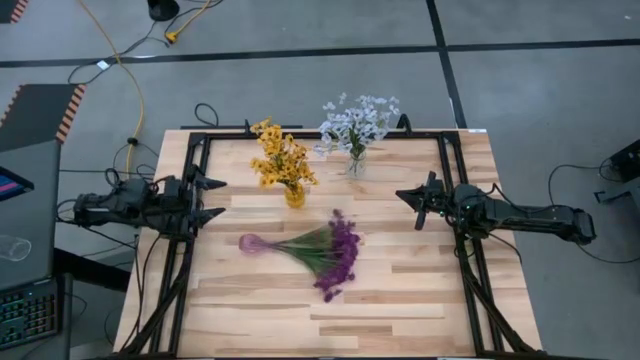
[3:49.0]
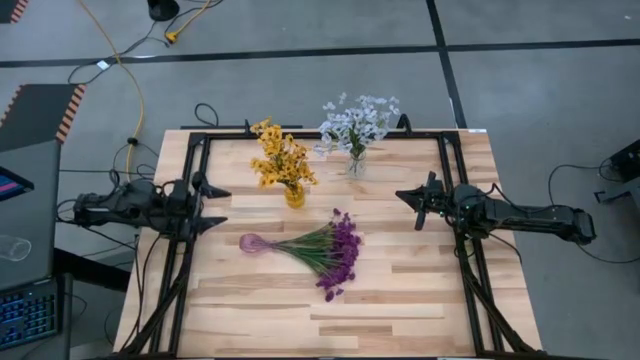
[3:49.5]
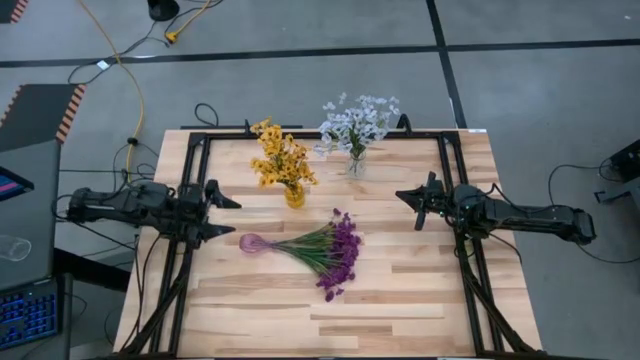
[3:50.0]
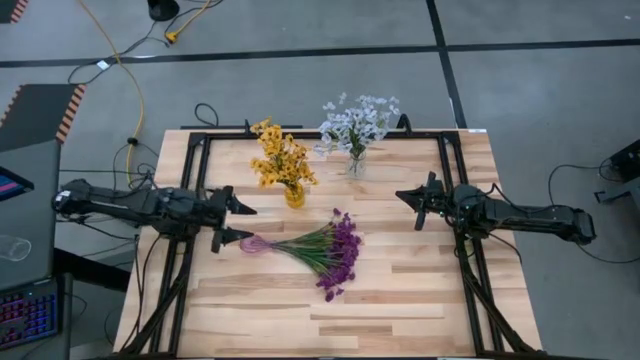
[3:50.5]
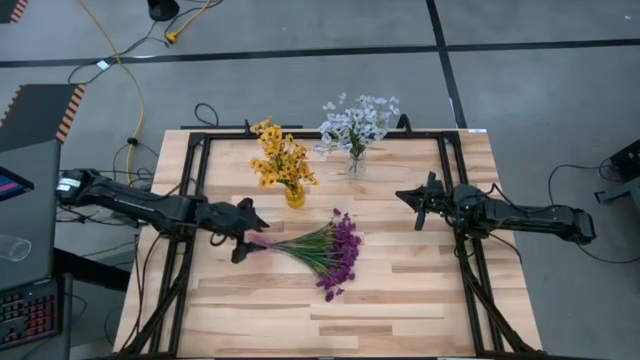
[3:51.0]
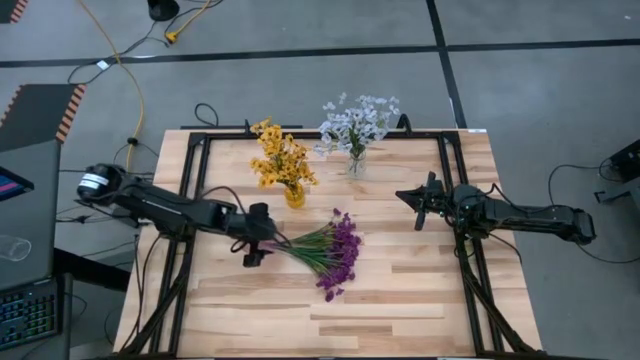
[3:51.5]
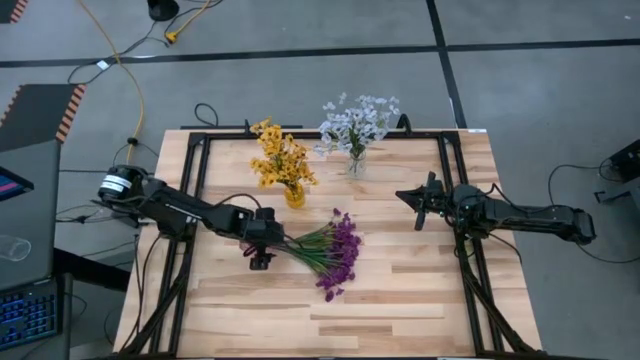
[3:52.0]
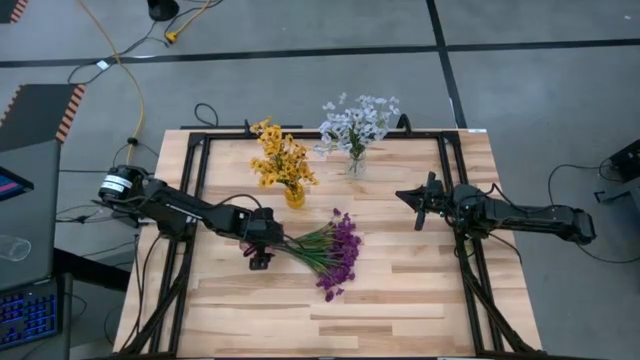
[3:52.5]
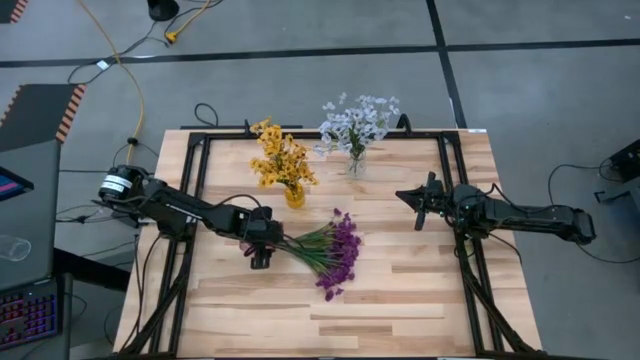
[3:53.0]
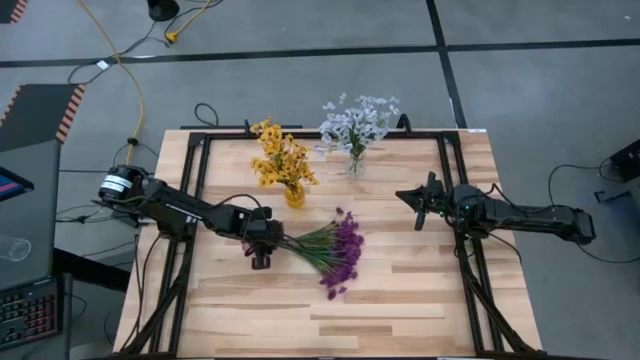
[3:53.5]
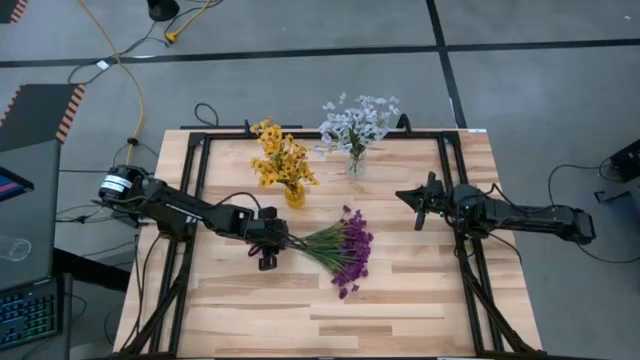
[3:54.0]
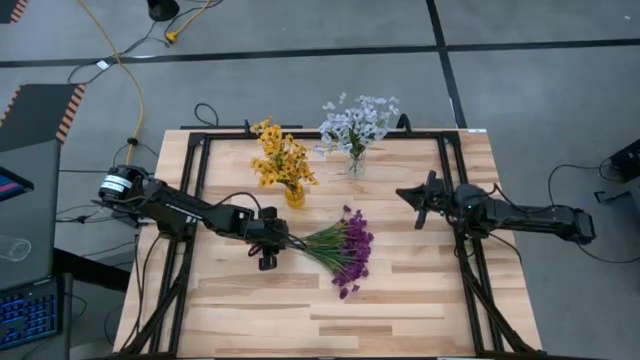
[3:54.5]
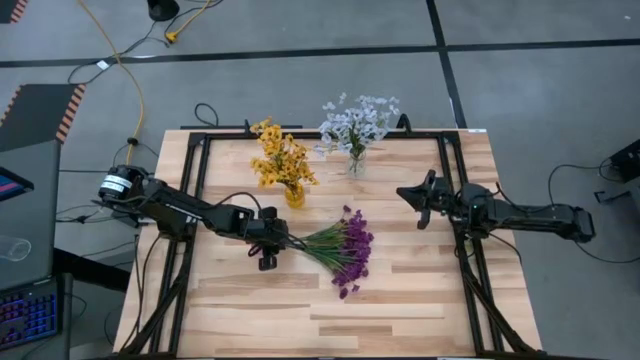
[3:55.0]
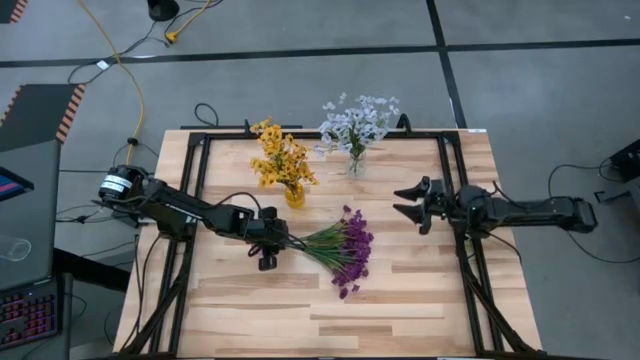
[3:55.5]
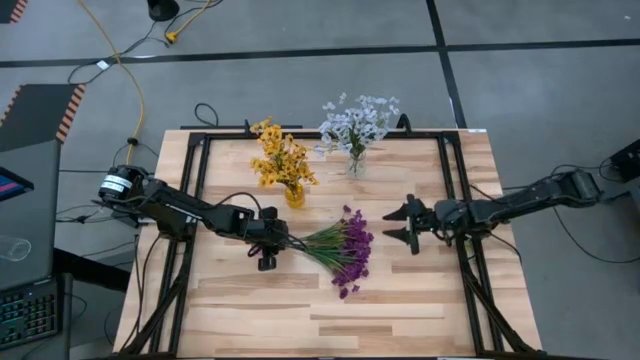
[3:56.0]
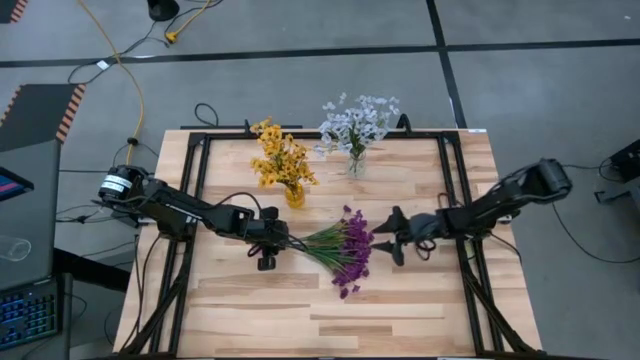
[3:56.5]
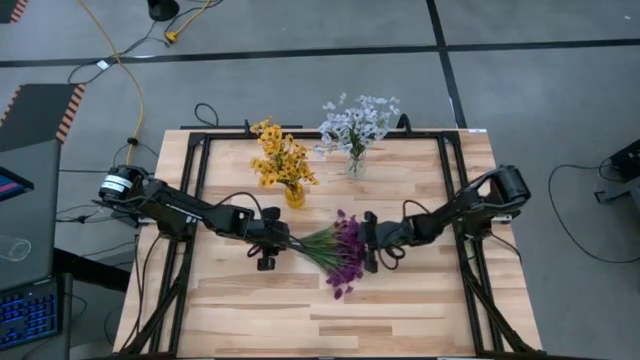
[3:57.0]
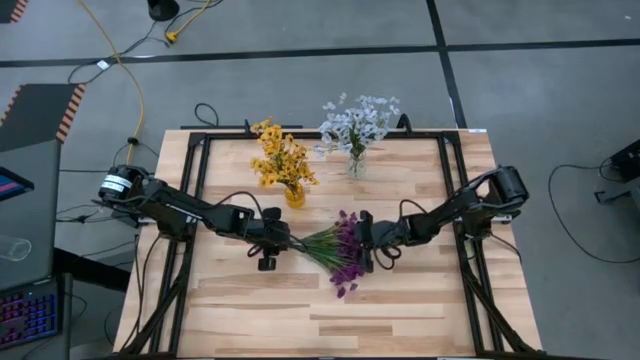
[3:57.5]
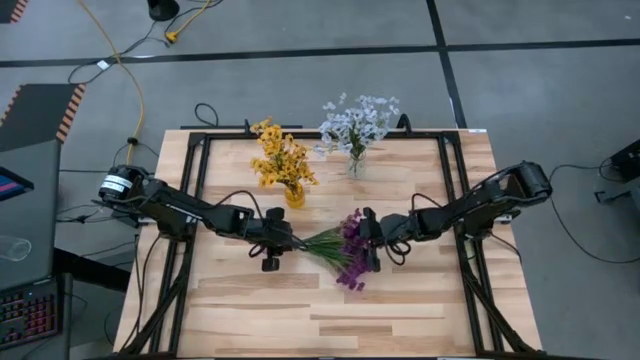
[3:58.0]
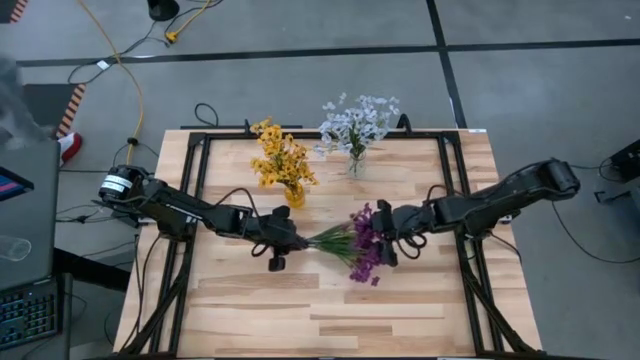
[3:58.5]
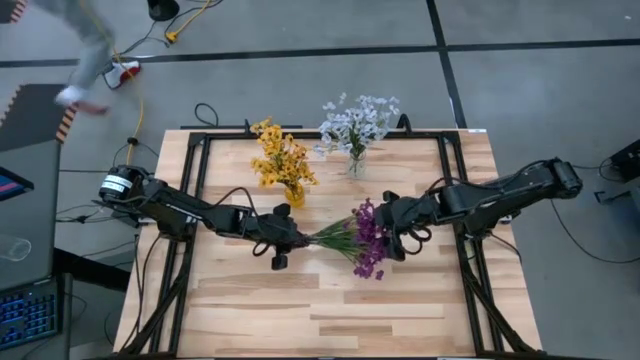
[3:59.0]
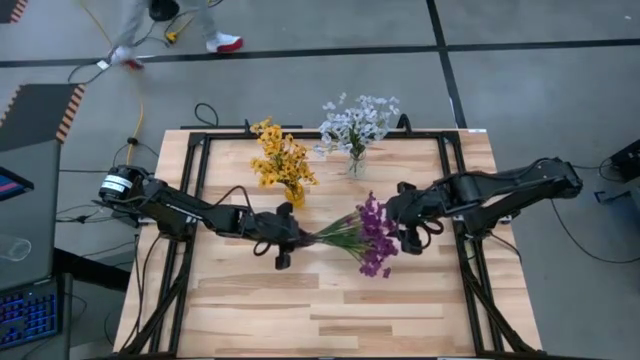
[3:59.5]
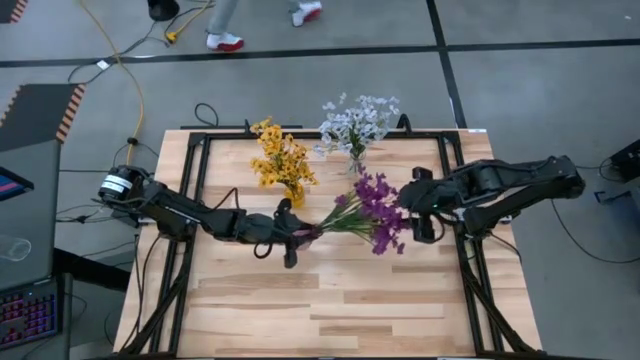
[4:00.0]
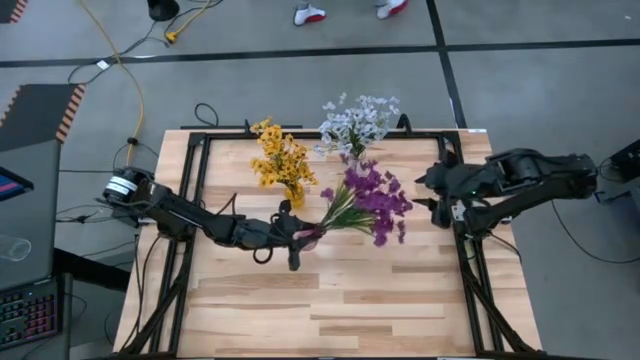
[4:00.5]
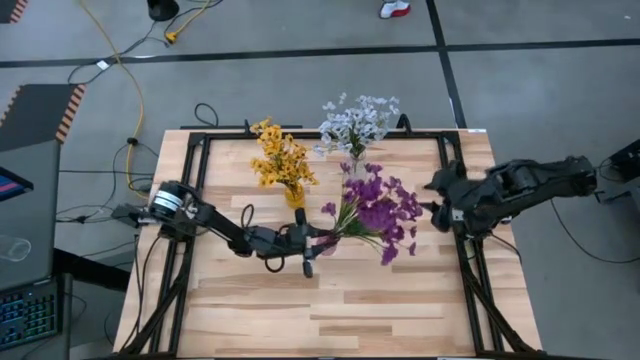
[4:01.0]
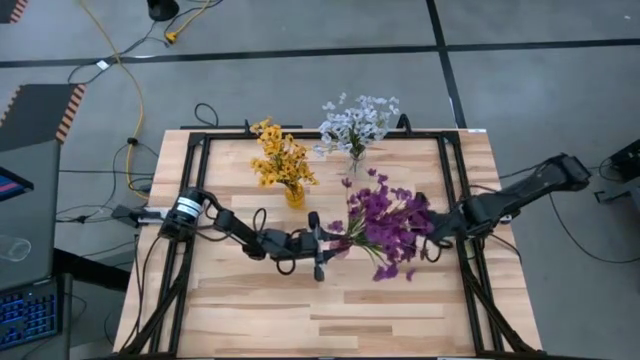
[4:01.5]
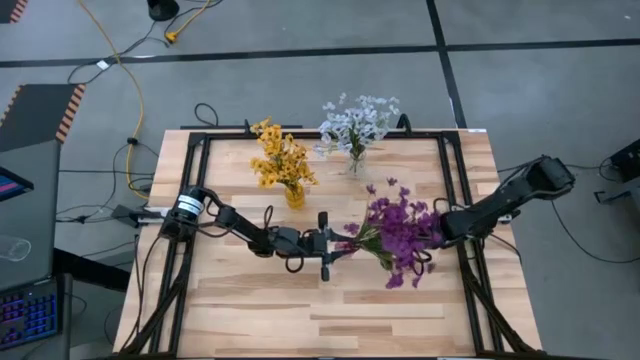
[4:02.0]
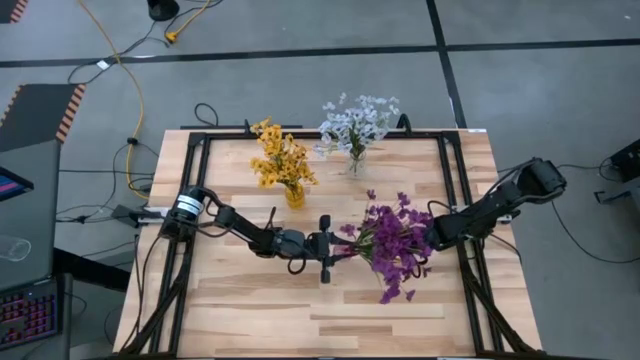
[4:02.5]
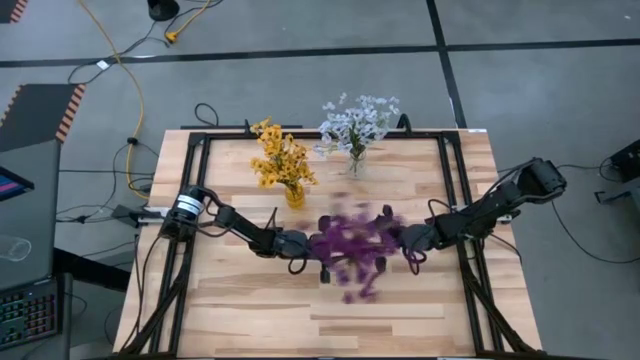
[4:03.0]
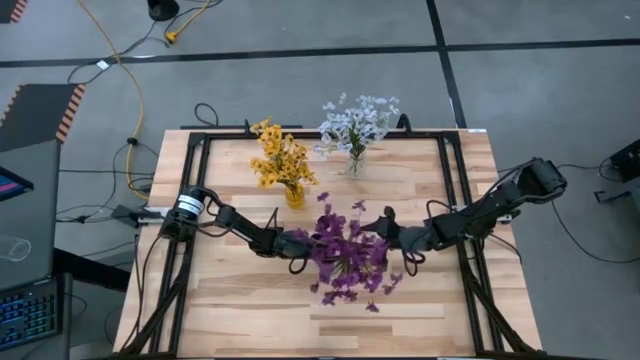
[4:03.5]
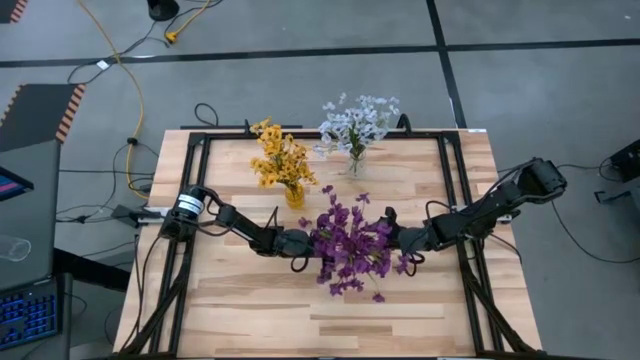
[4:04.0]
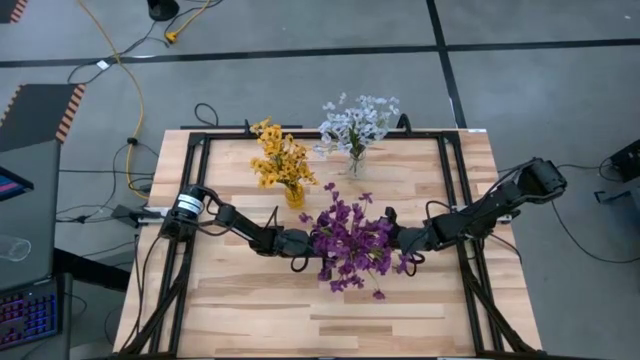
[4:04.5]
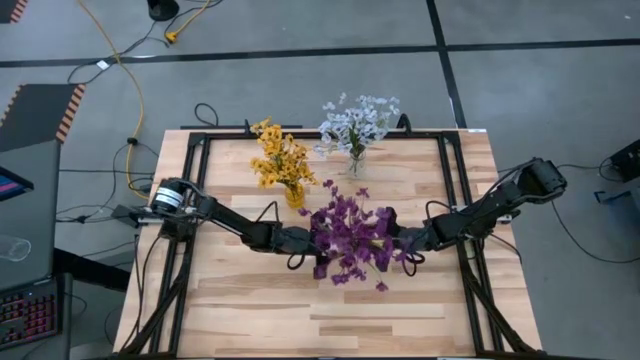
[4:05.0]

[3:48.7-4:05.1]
Task: Sort flowers into vase by color
Move the violet vase to the center of the table

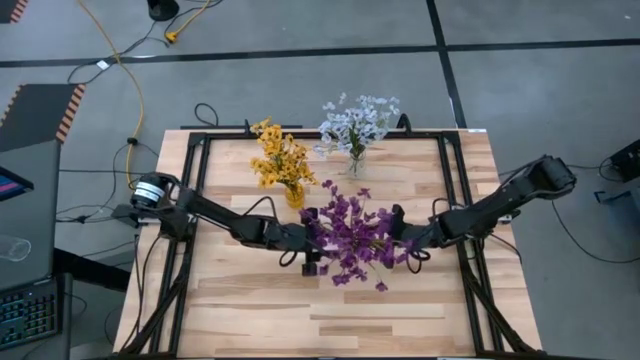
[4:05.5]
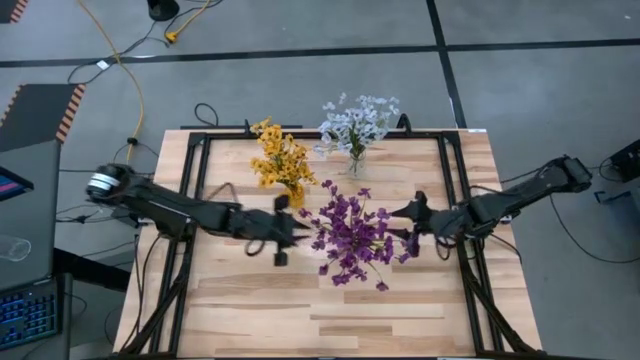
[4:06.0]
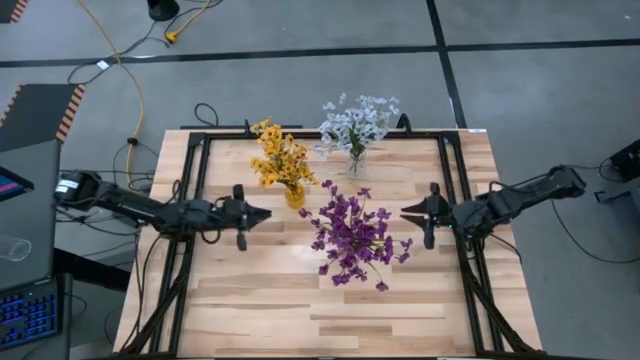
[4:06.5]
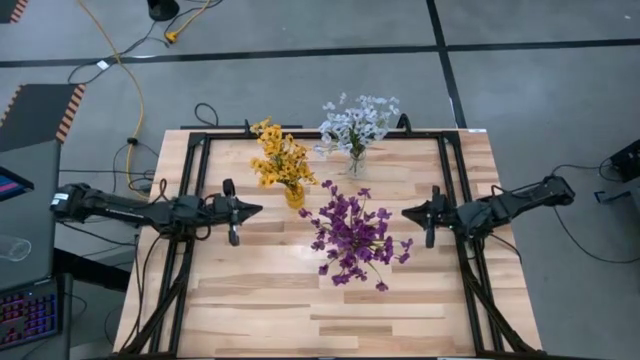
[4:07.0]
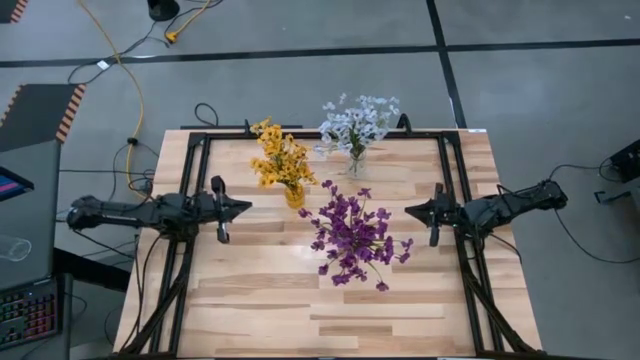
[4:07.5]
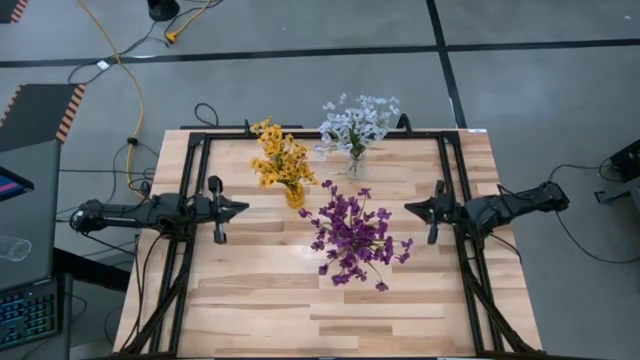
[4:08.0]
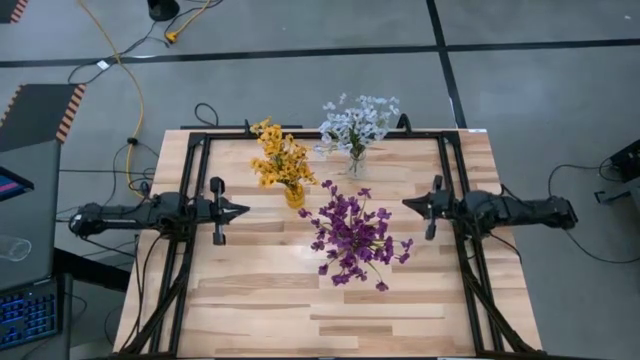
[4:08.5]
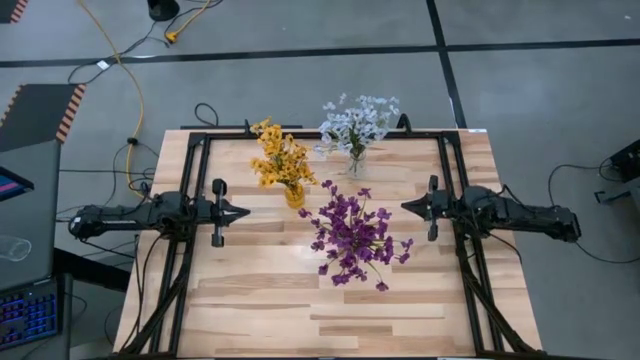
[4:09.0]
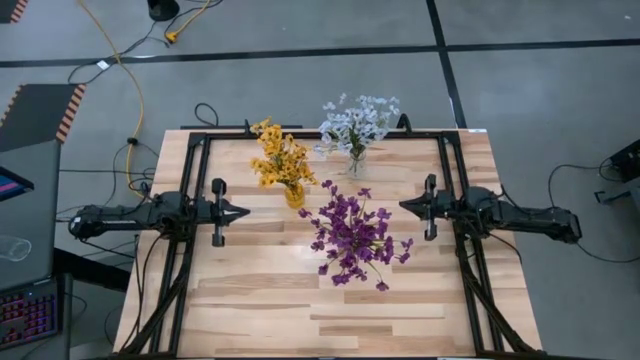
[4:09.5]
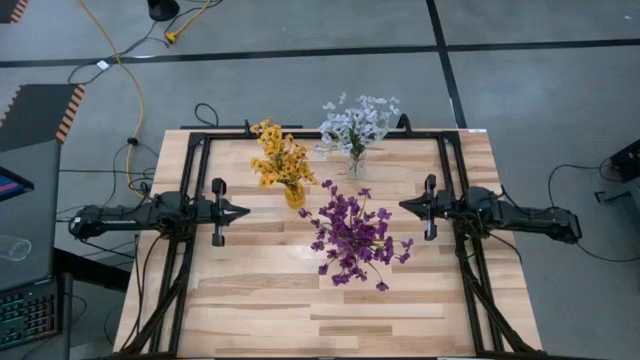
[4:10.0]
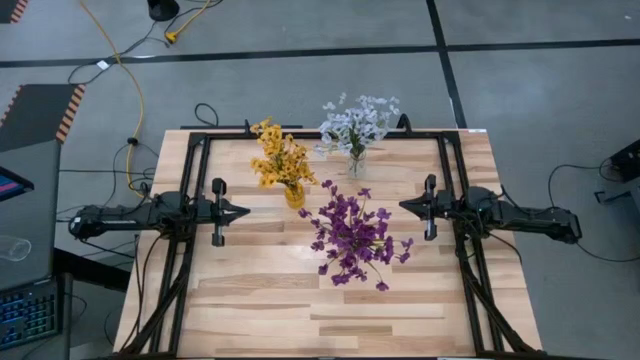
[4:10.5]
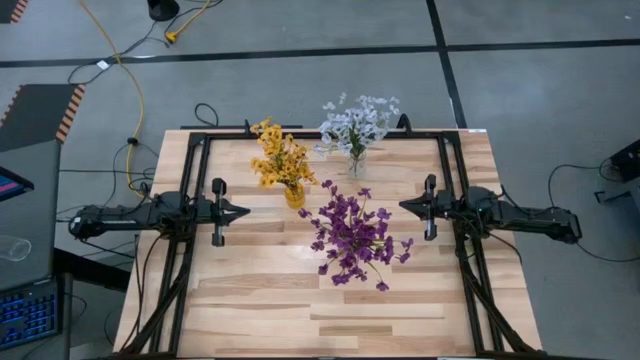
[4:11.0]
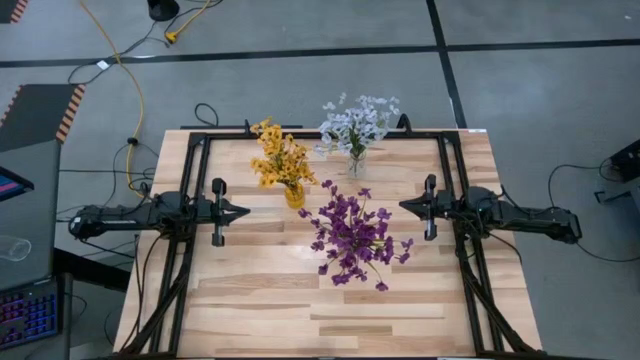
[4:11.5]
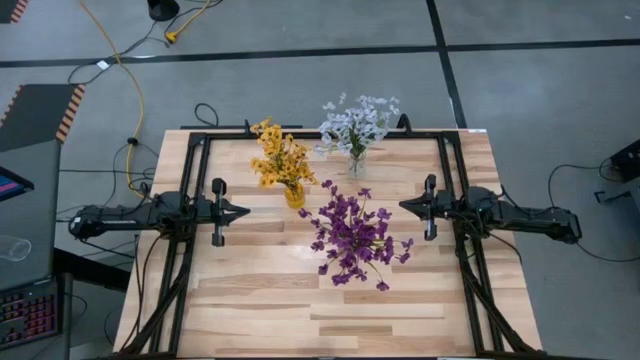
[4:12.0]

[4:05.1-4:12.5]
Return to Home Position
